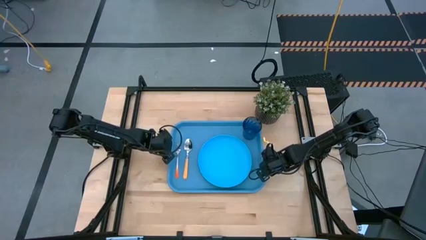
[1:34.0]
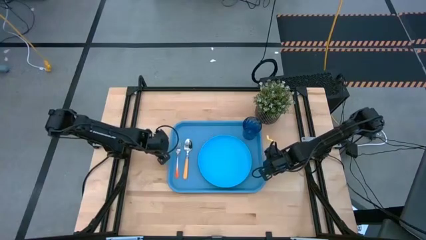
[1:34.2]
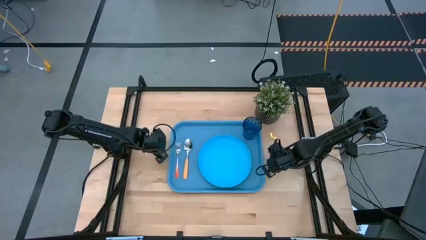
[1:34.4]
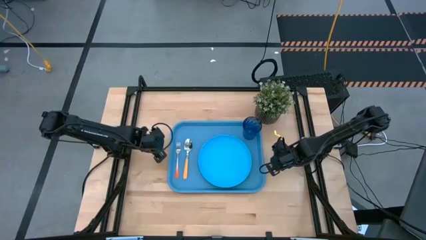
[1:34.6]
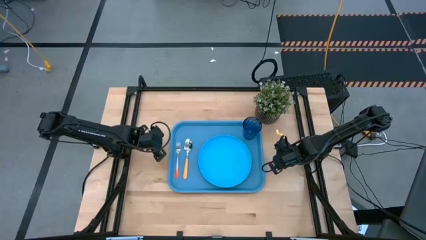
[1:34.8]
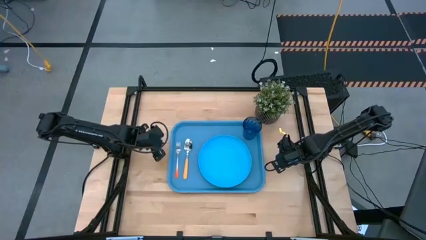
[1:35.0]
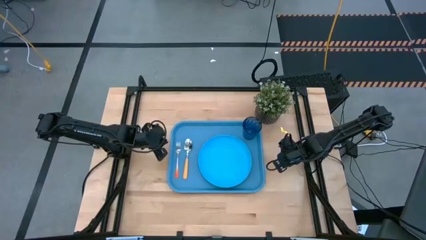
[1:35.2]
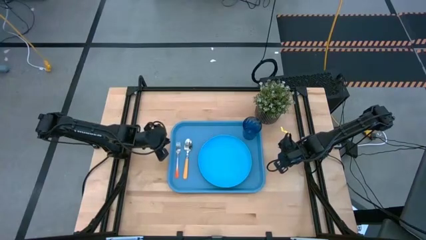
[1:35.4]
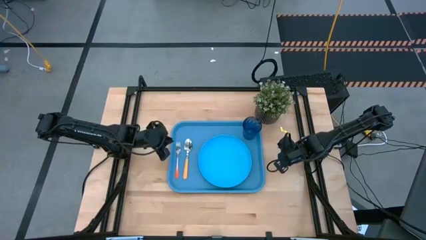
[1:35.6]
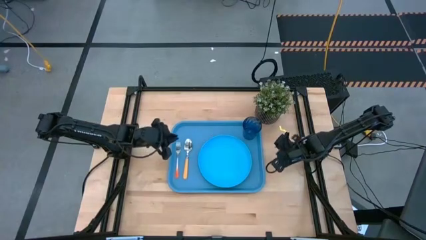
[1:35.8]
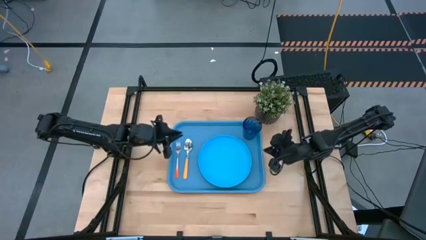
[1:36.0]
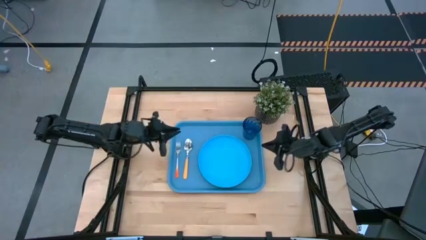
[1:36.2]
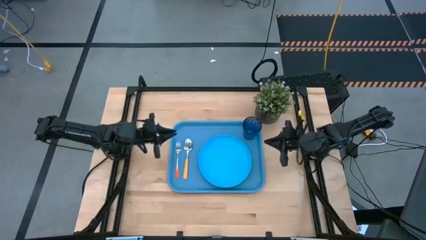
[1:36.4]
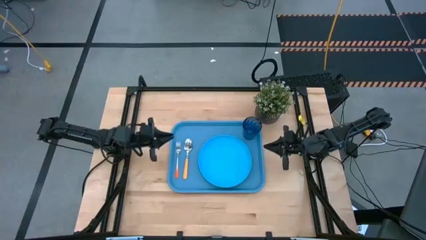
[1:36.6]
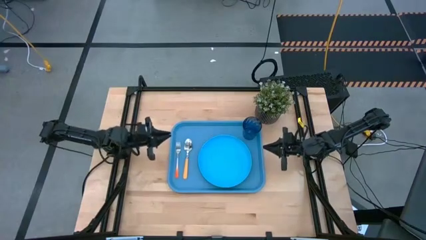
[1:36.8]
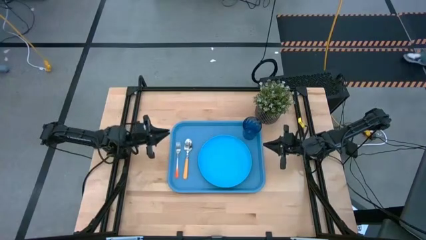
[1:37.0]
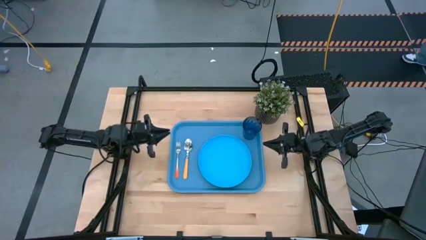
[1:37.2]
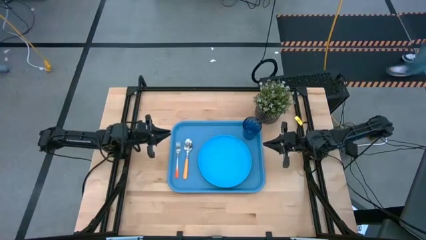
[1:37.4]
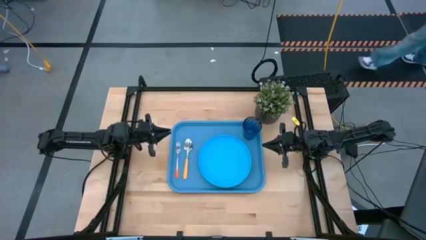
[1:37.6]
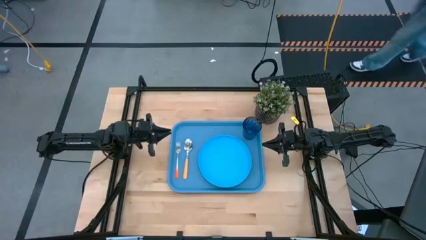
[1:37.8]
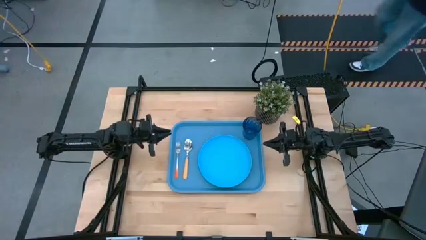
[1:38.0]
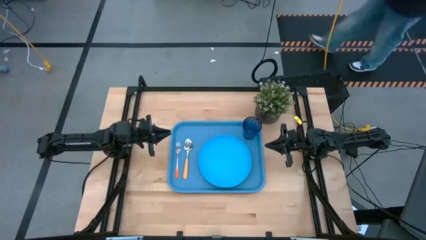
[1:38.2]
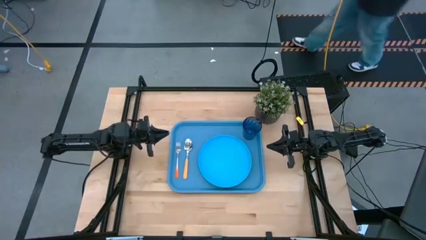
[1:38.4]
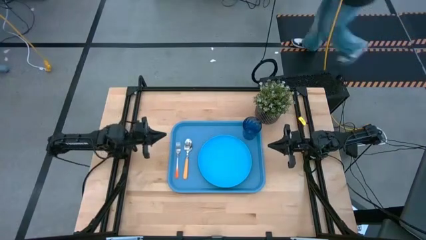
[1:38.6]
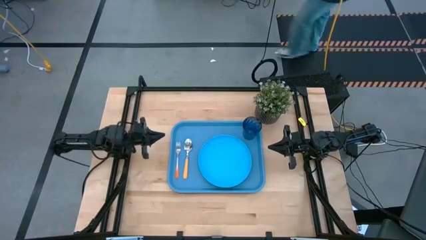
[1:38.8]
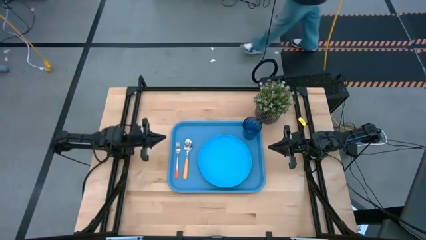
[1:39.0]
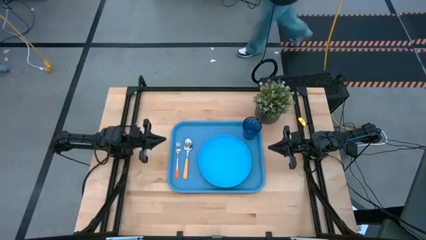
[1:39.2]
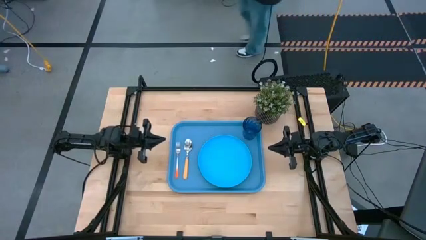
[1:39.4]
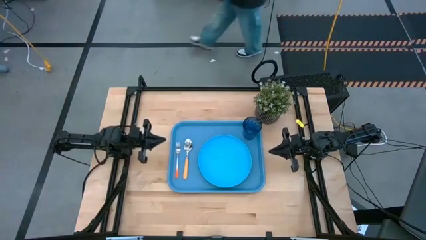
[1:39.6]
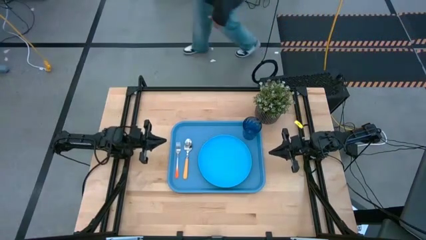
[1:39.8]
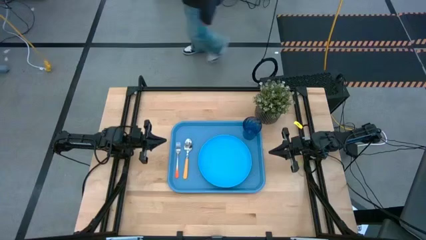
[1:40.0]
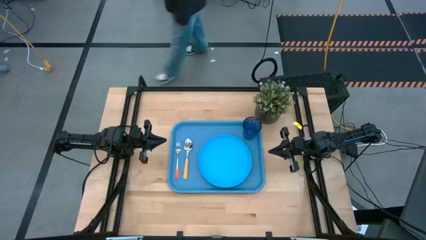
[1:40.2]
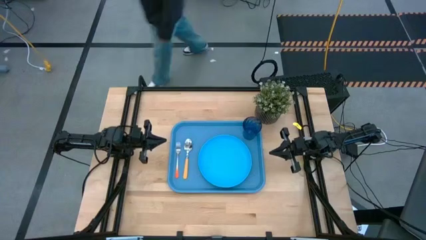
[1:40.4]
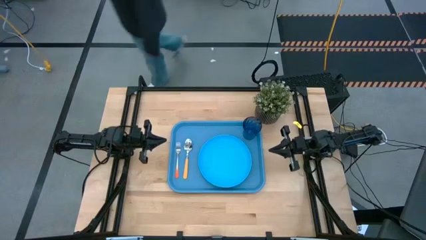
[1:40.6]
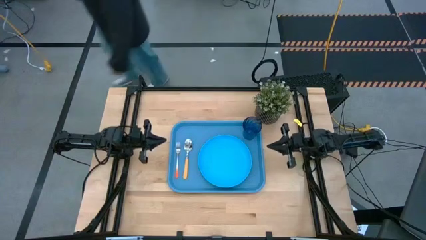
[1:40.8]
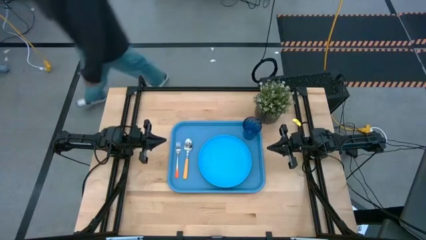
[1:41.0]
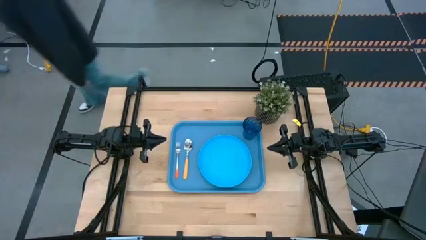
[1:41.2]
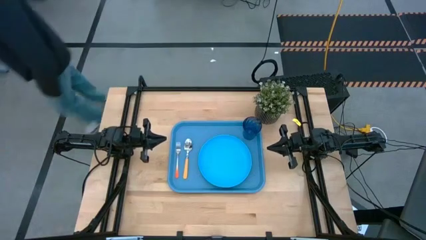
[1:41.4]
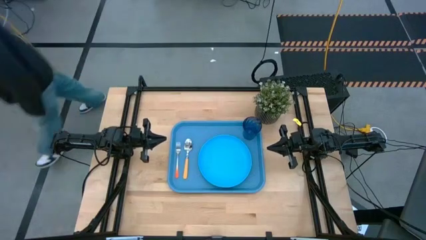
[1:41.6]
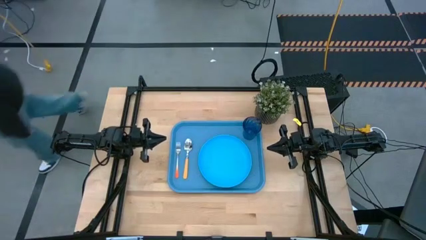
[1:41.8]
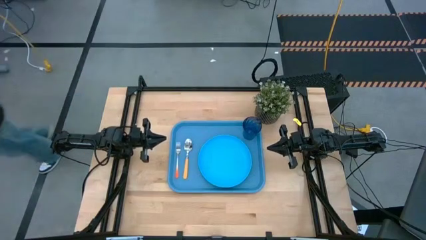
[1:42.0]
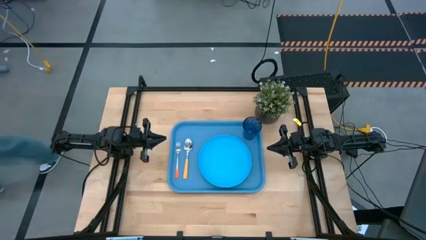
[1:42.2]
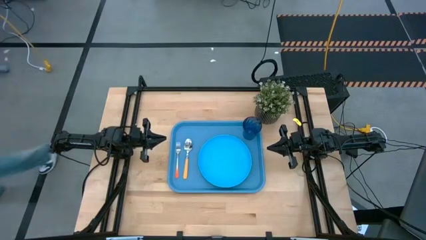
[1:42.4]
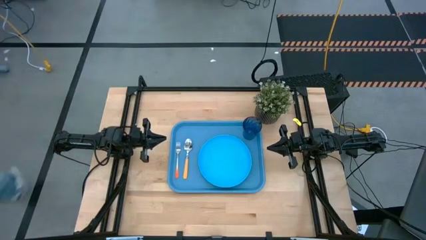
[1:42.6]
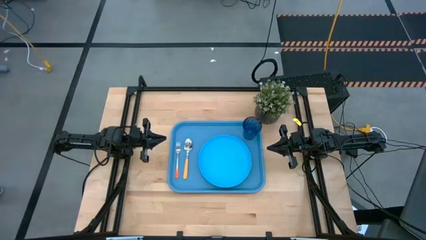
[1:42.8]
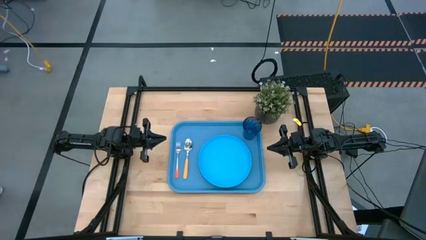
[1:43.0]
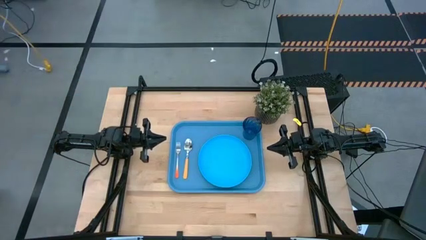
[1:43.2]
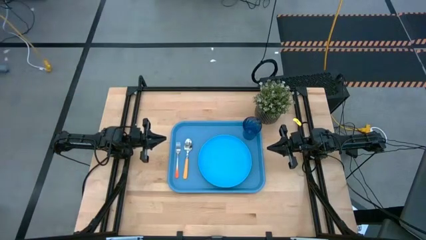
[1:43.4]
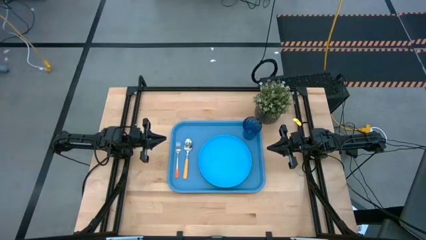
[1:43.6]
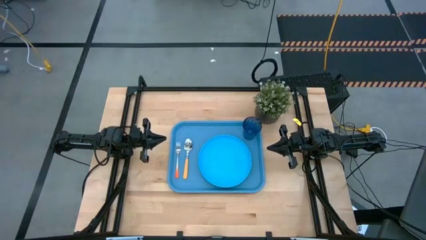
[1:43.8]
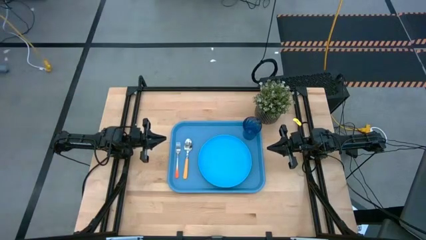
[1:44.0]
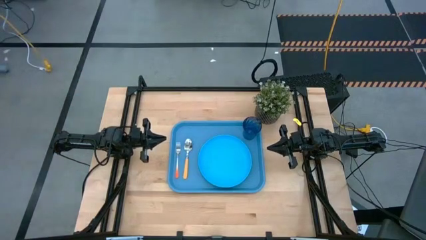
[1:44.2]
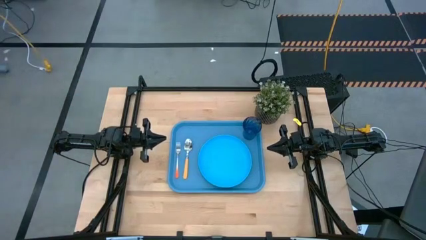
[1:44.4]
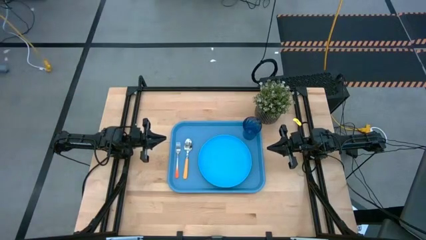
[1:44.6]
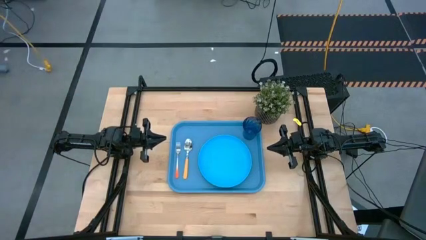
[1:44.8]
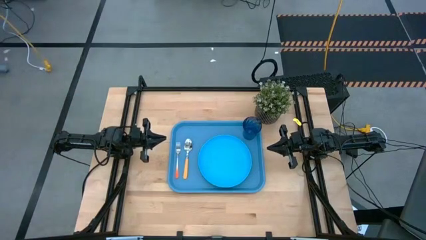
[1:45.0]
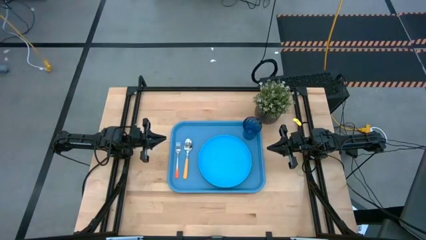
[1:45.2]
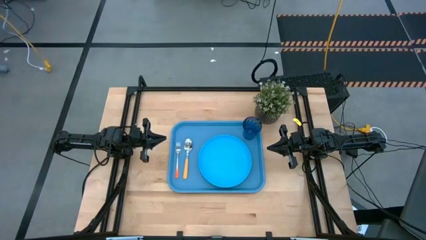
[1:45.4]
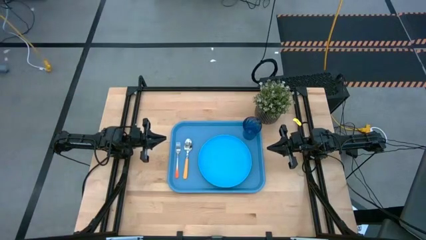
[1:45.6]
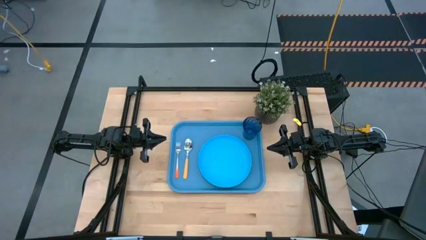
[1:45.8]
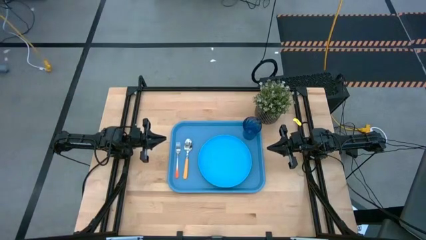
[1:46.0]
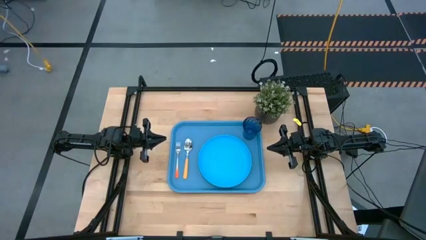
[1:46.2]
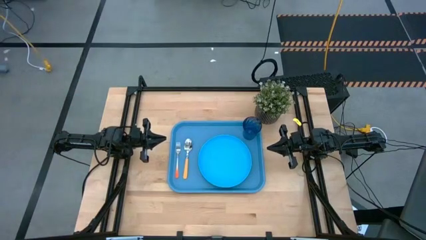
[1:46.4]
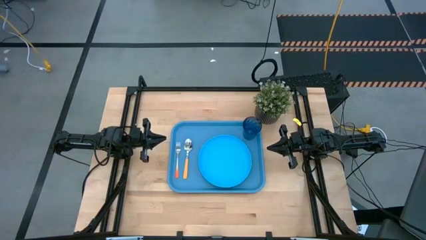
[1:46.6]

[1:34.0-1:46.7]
Task: Pick and place plate/cup/fork/spoon on tray
Return to Home Position
